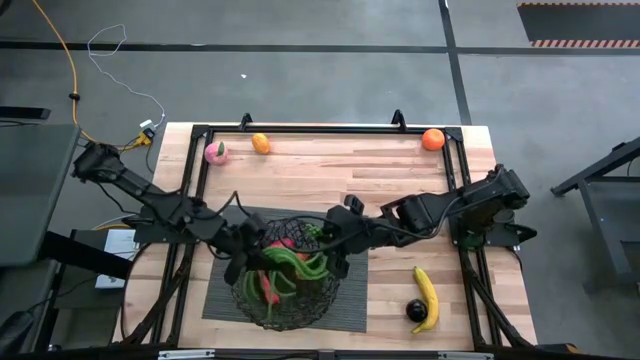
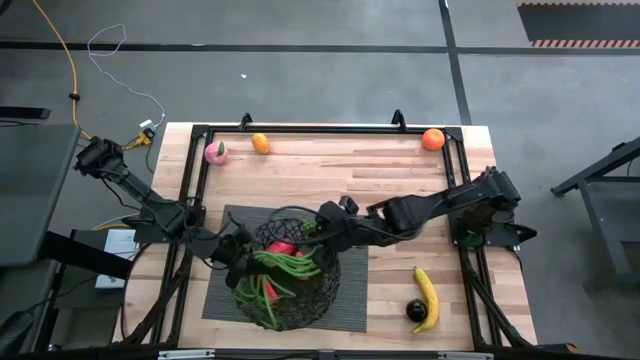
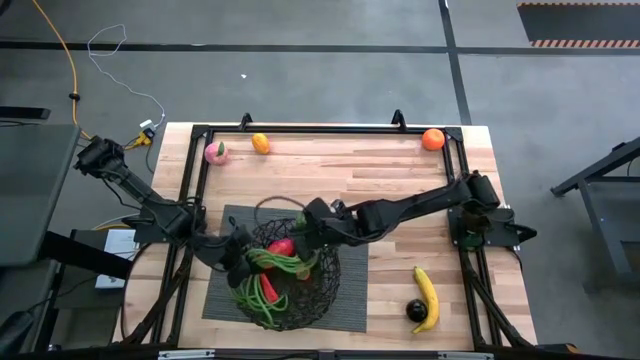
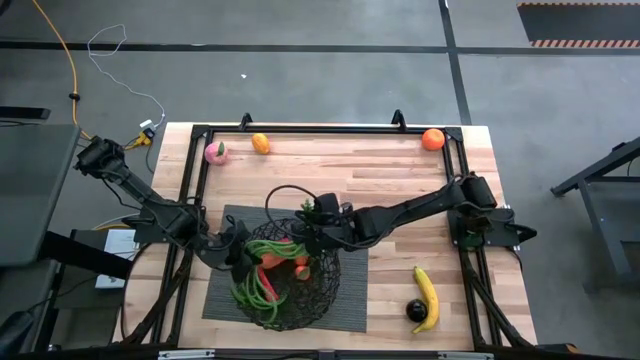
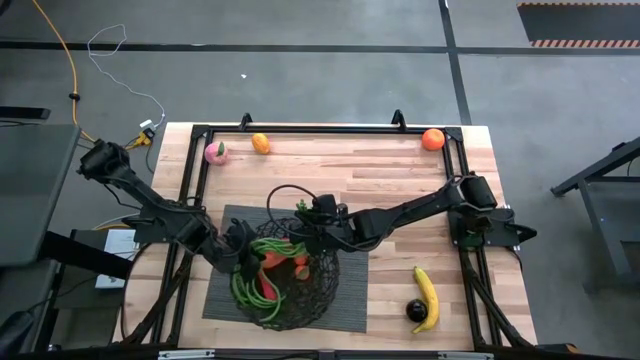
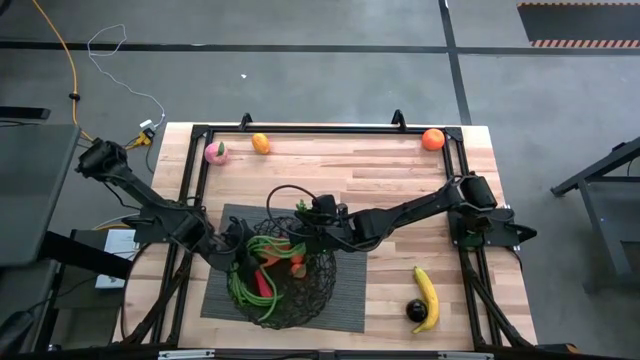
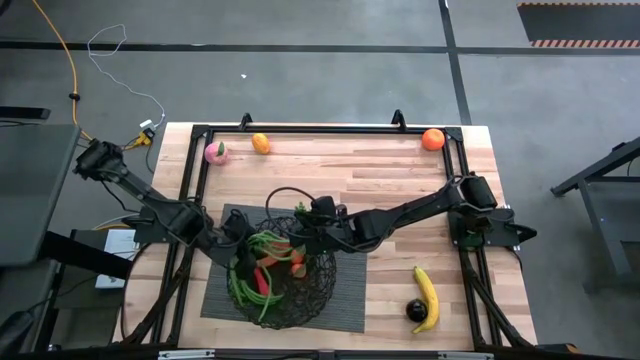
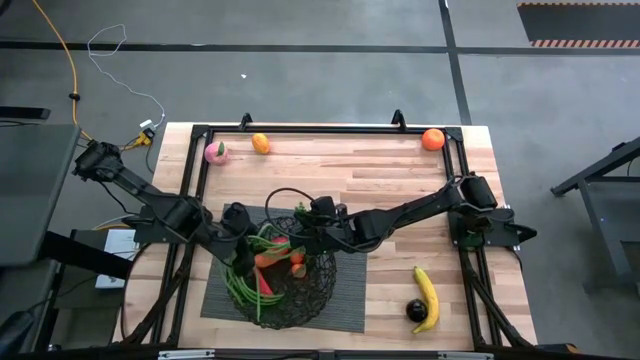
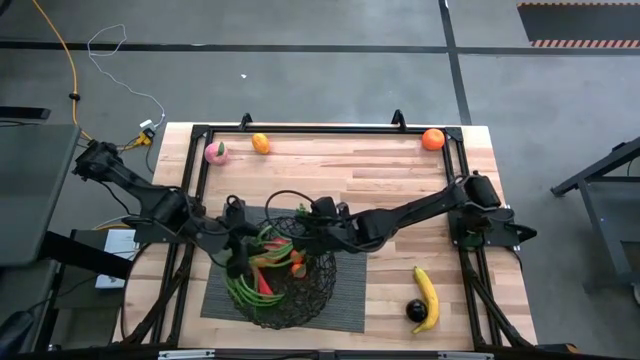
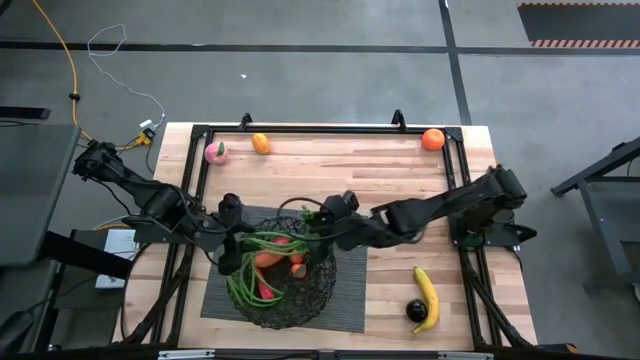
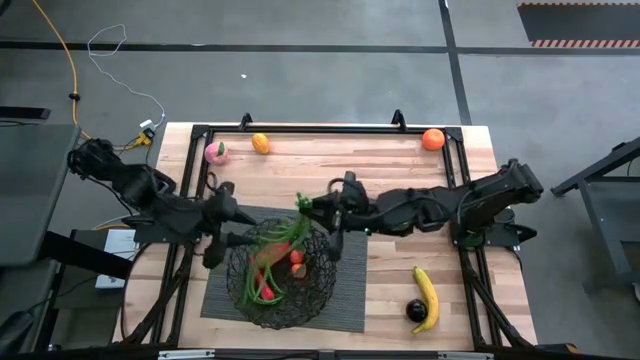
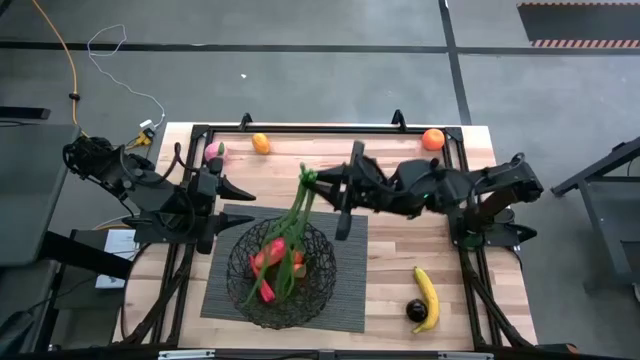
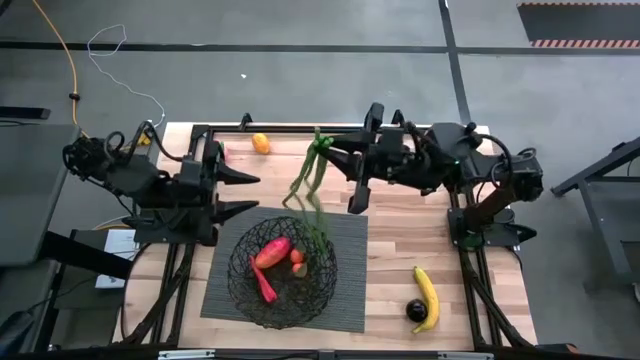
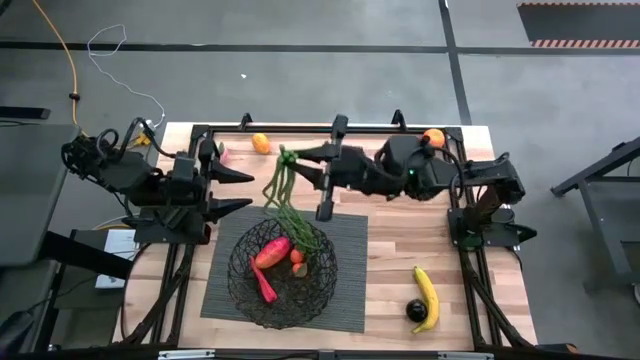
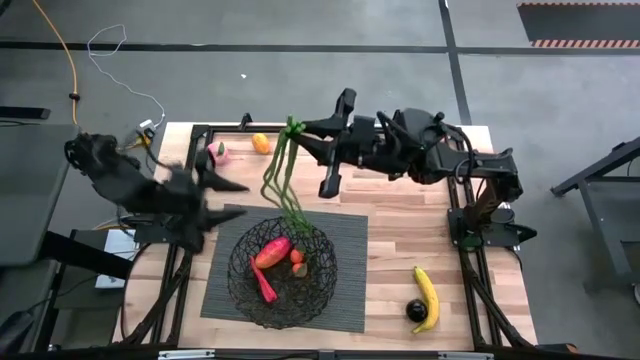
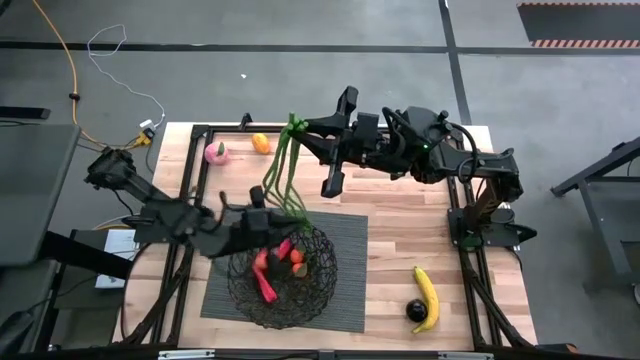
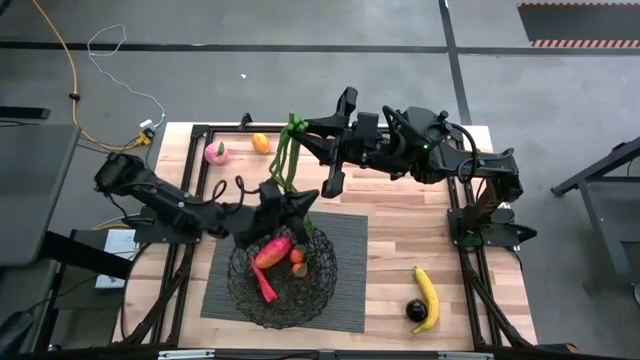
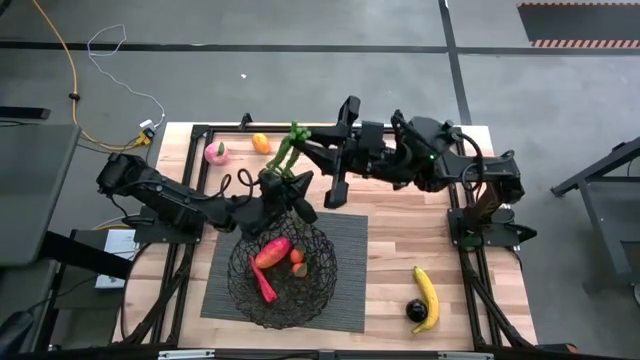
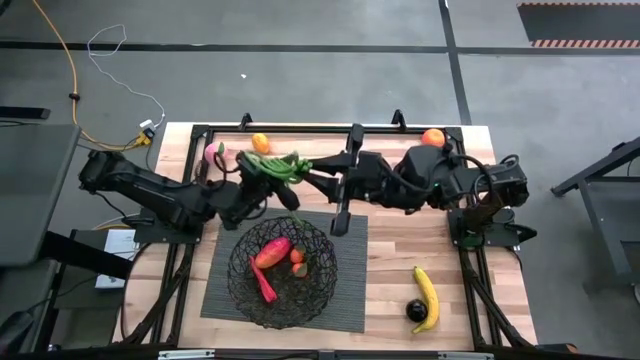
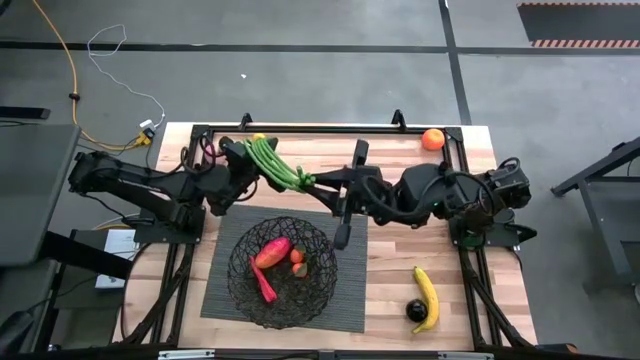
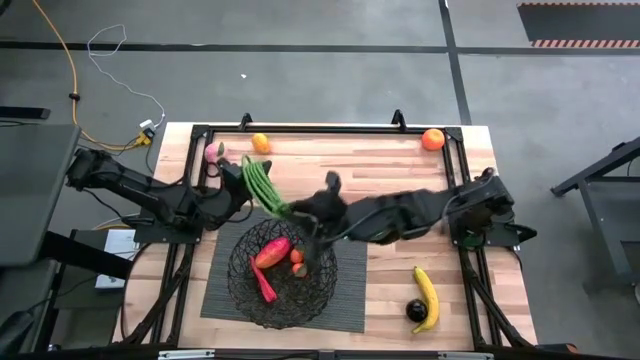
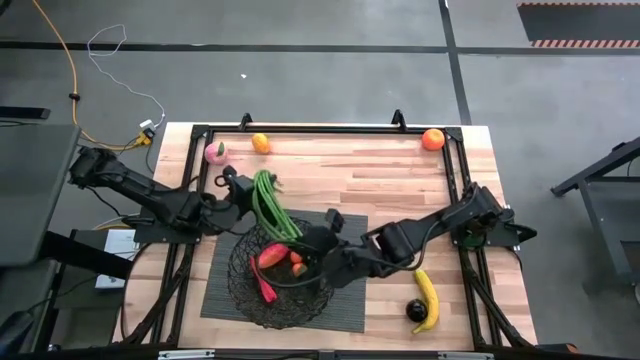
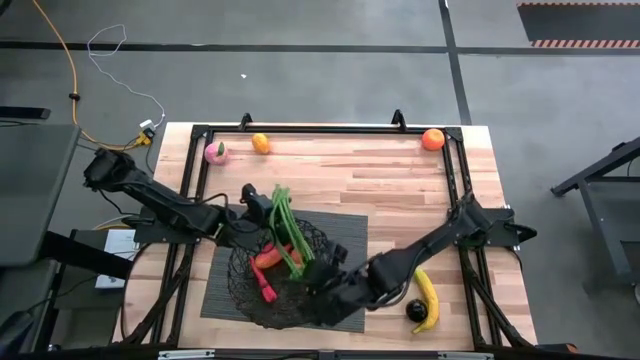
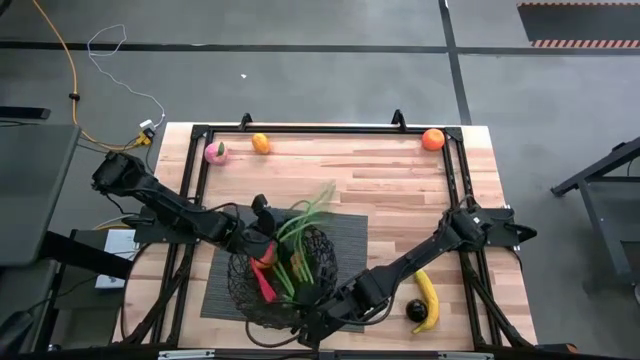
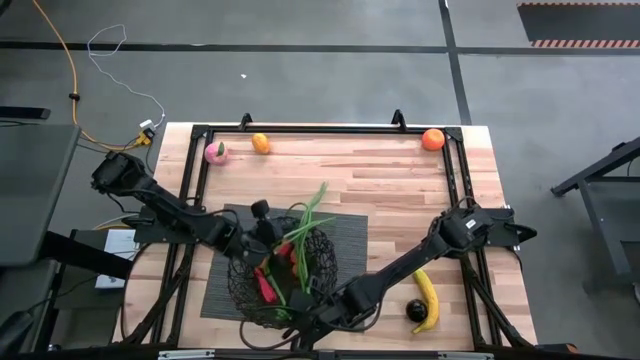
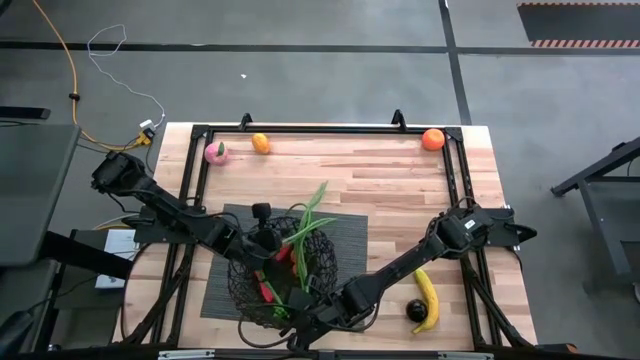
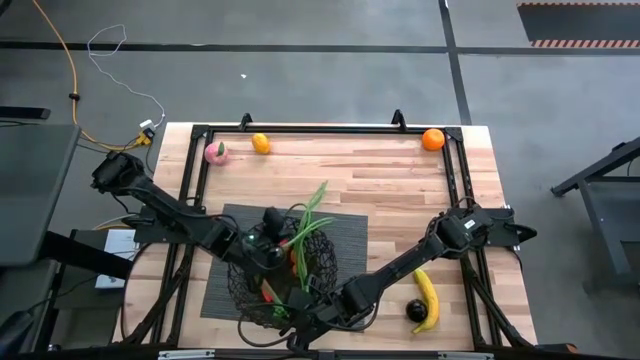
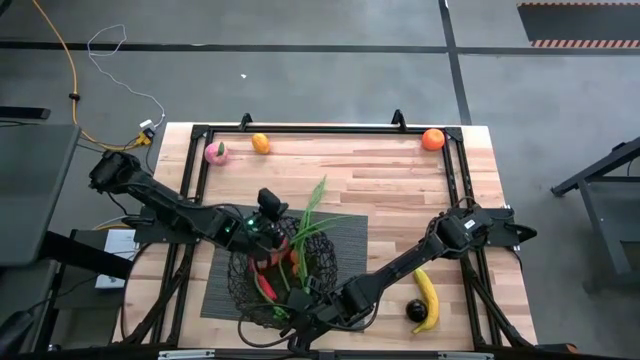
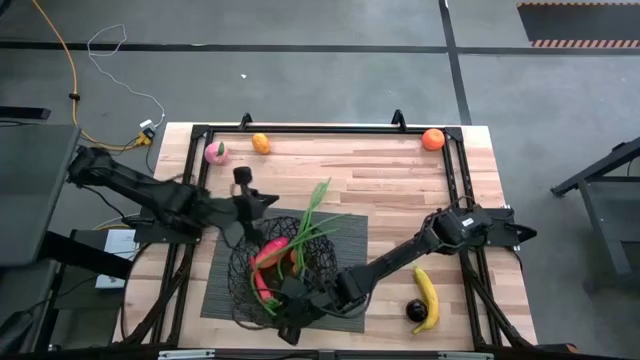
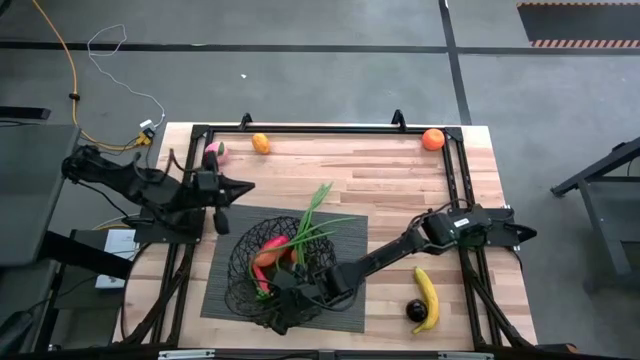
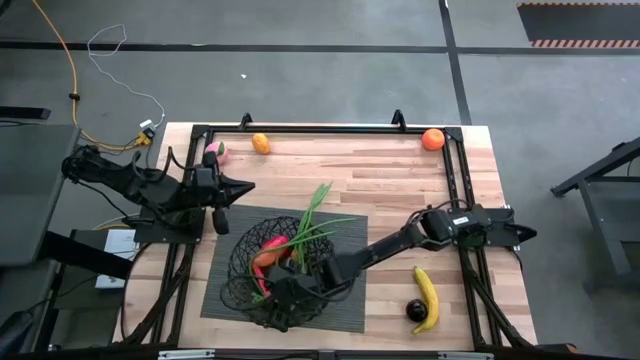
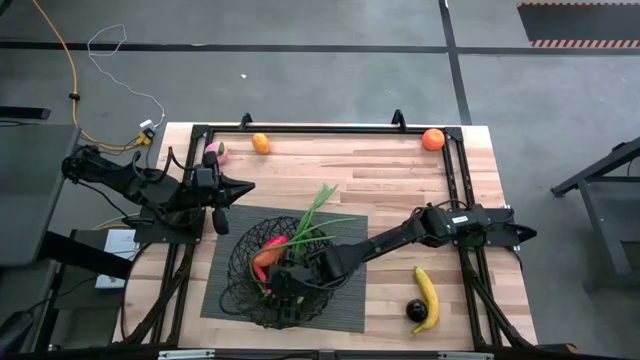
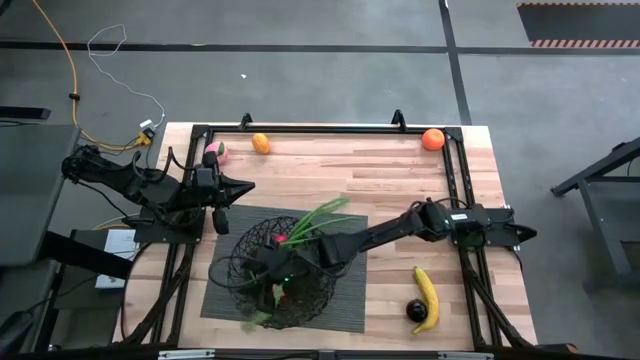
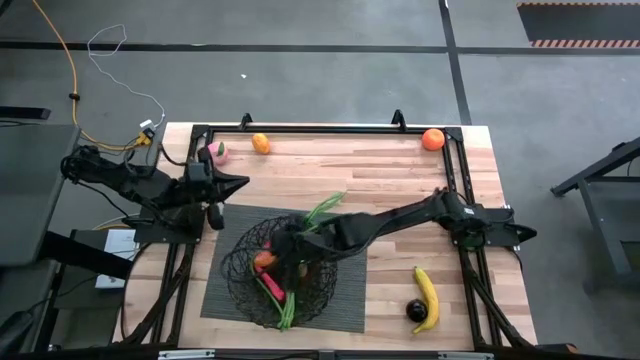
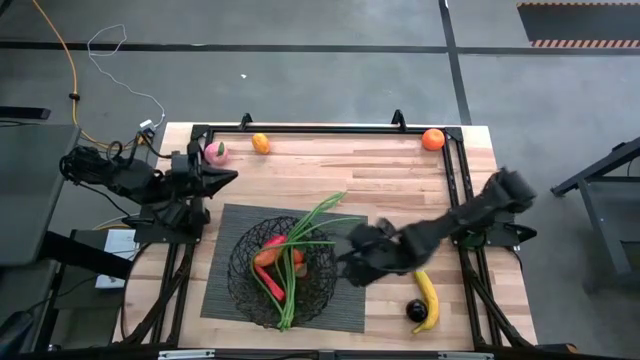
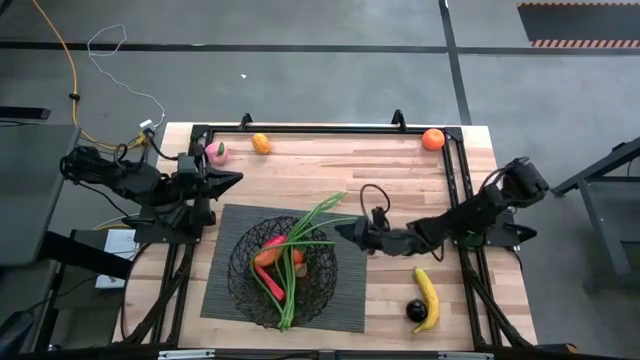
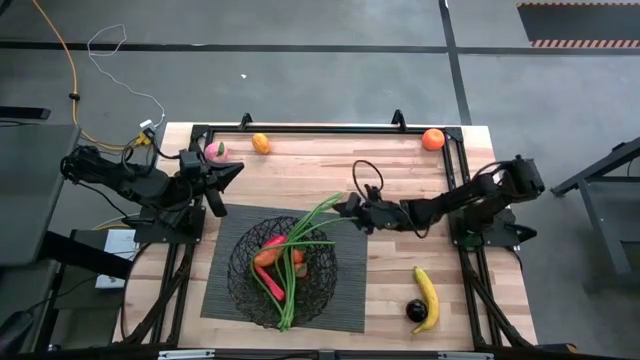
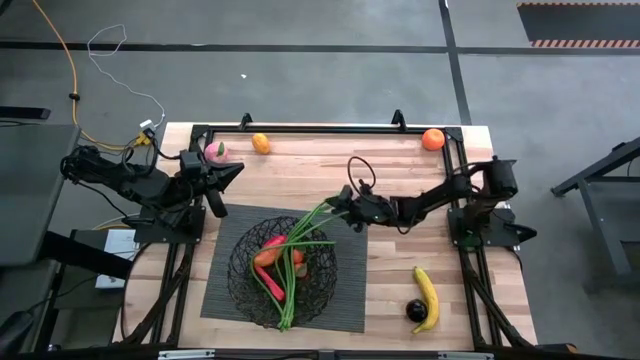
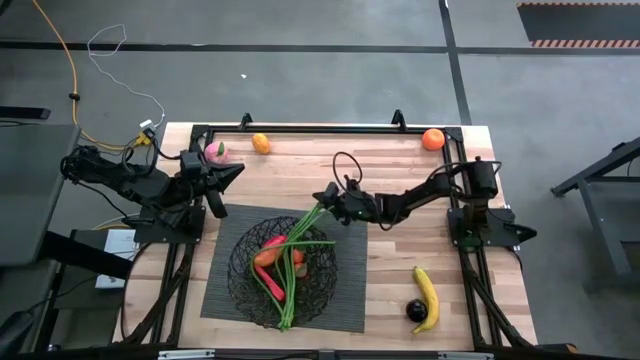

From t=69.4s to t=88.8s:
Task: Build produce basket
Put the green string beans into the black wire basket

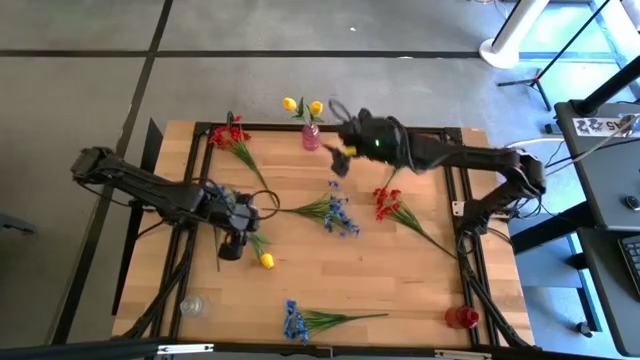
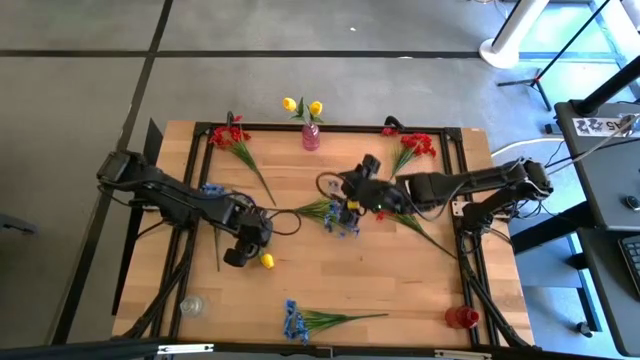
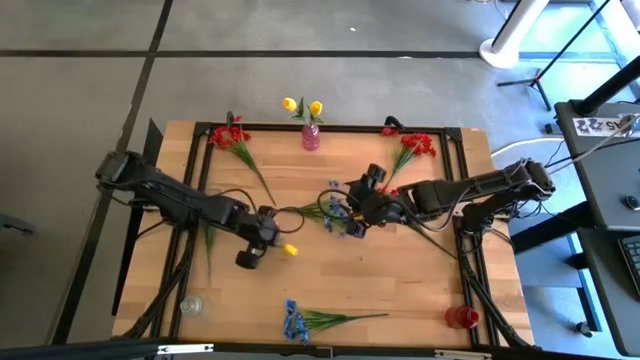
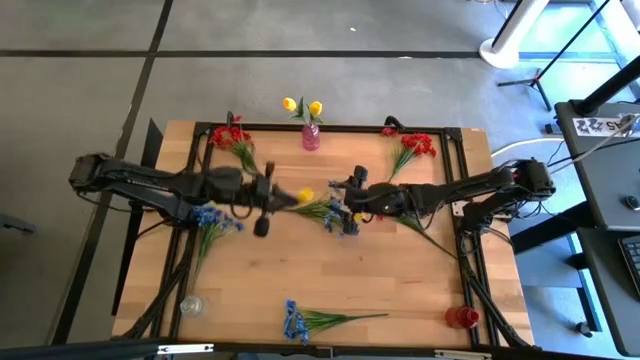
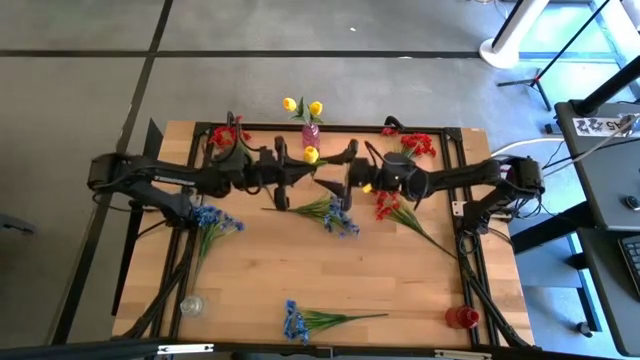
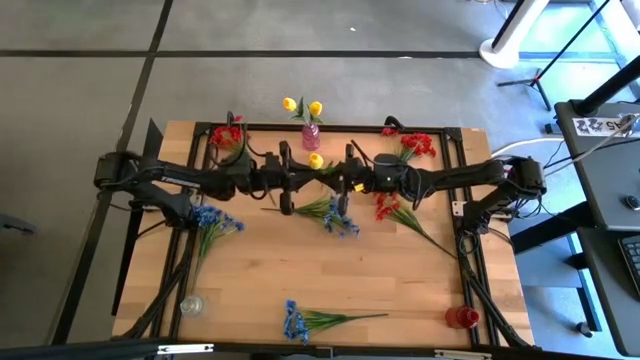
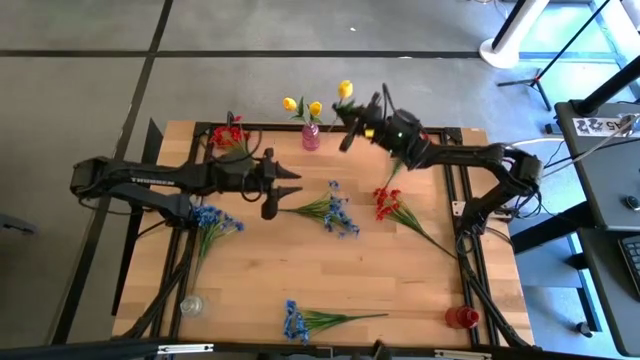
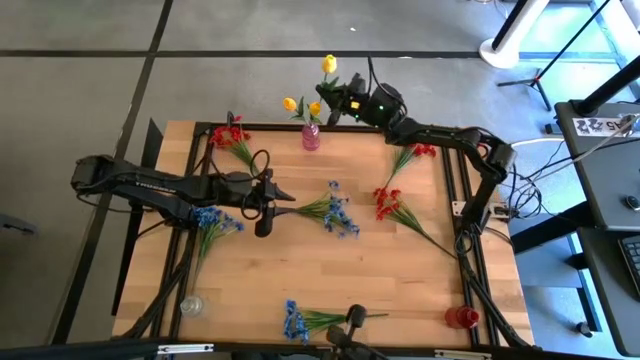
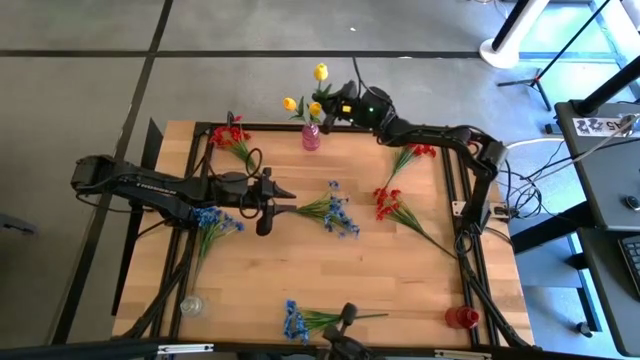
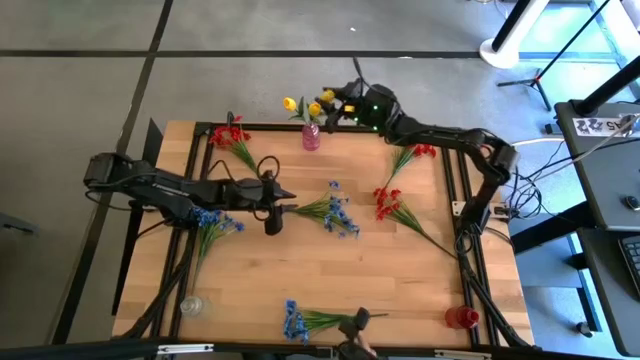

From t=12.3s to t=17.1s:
Task: Sort flowers into vase by color
Put the yellow flower into the pink vase
